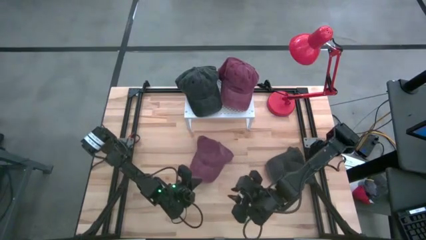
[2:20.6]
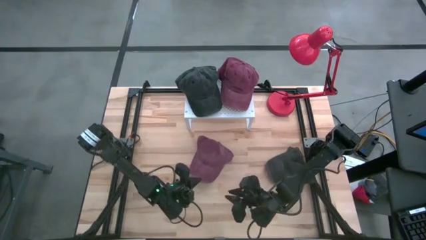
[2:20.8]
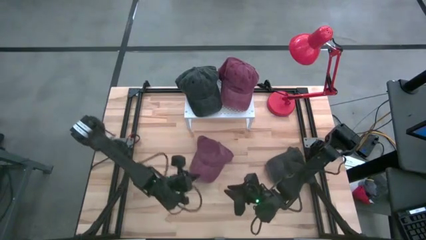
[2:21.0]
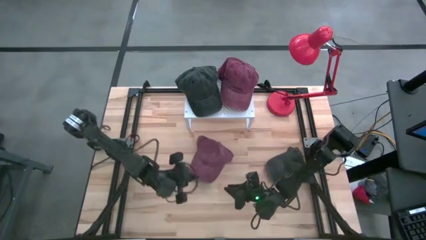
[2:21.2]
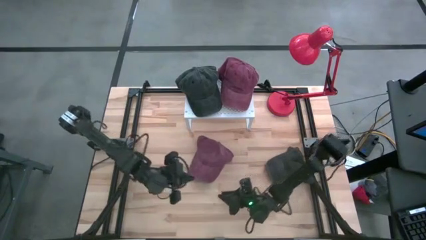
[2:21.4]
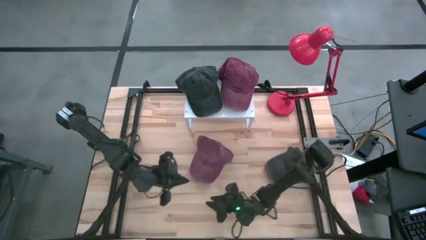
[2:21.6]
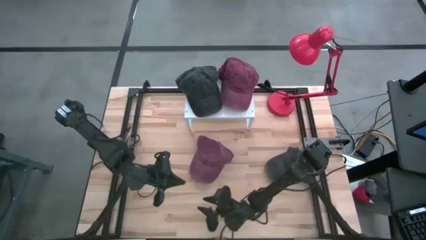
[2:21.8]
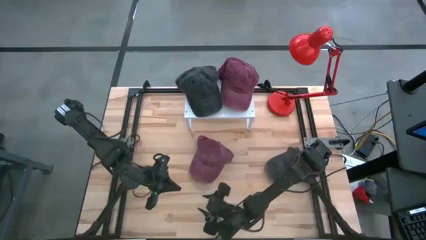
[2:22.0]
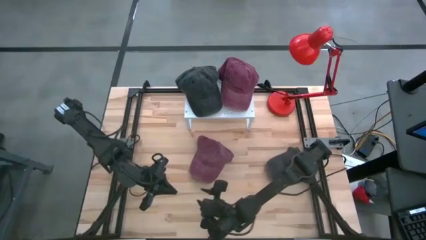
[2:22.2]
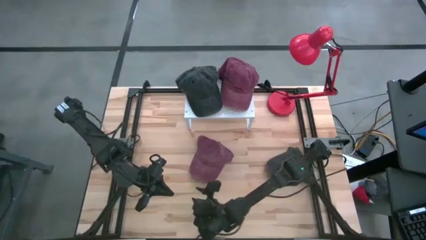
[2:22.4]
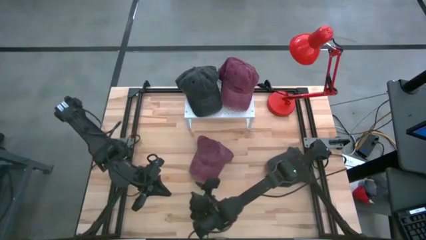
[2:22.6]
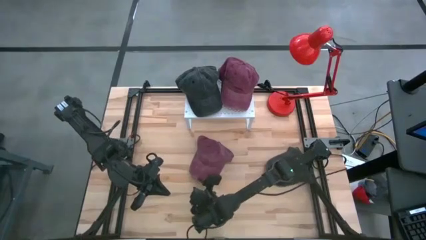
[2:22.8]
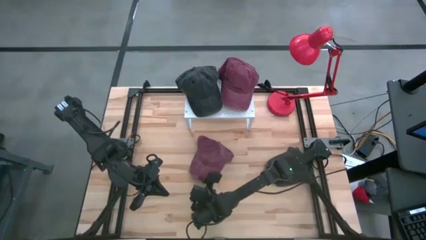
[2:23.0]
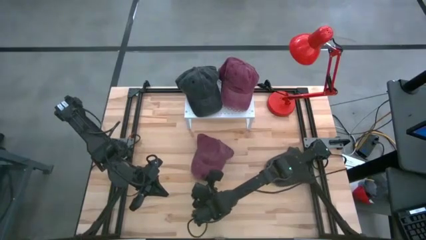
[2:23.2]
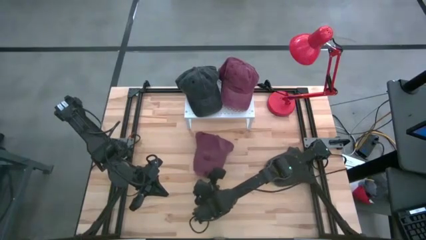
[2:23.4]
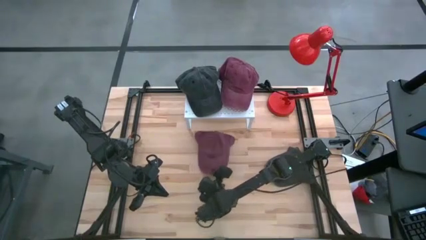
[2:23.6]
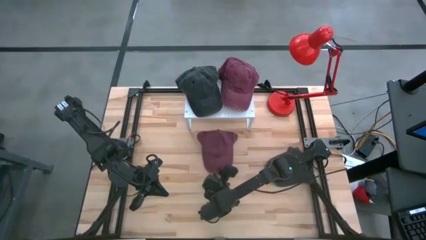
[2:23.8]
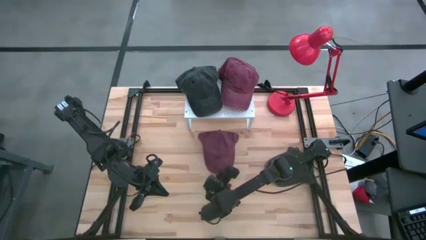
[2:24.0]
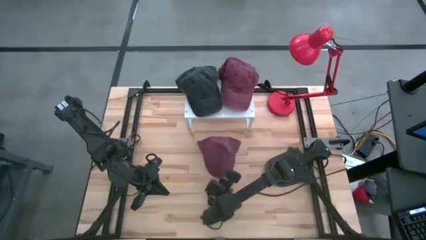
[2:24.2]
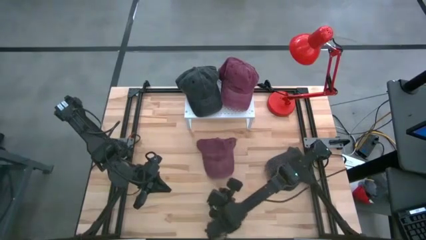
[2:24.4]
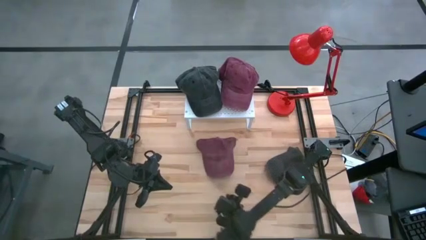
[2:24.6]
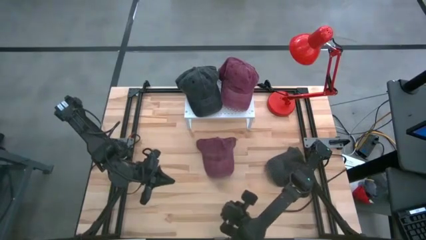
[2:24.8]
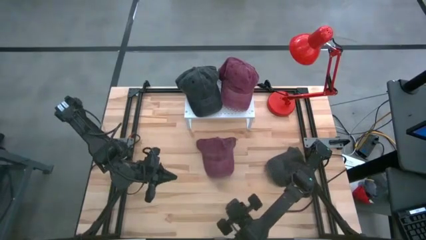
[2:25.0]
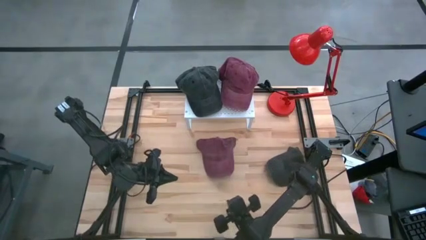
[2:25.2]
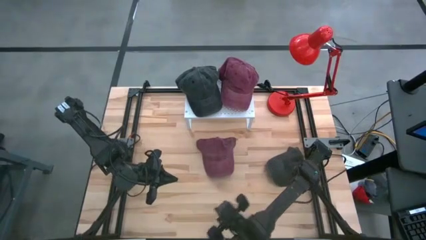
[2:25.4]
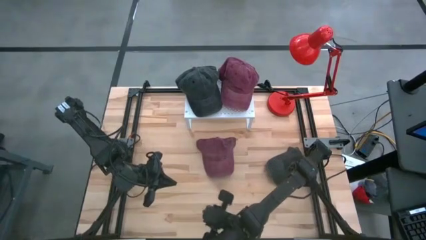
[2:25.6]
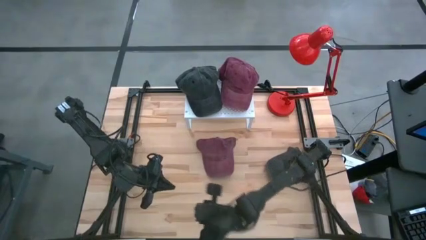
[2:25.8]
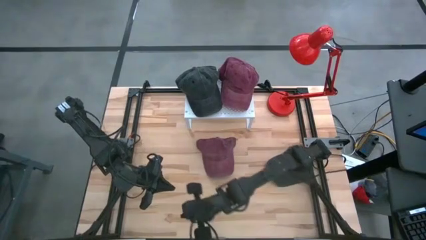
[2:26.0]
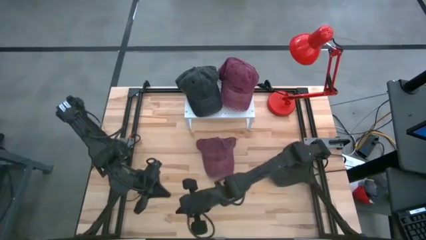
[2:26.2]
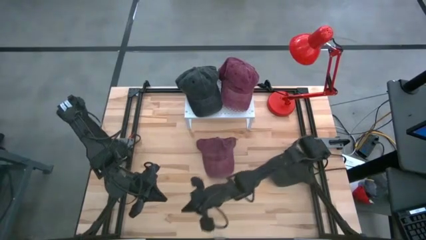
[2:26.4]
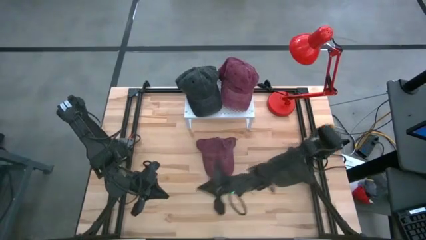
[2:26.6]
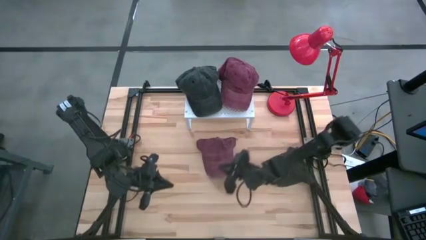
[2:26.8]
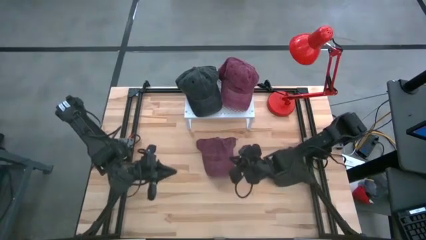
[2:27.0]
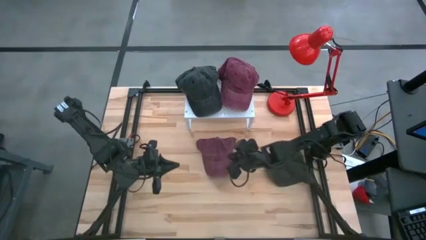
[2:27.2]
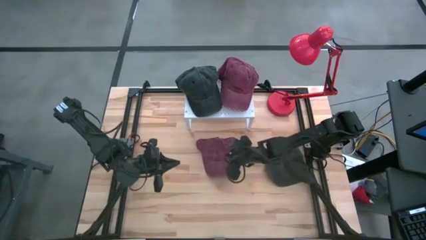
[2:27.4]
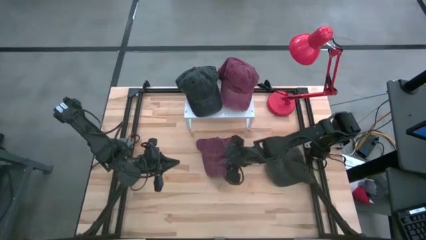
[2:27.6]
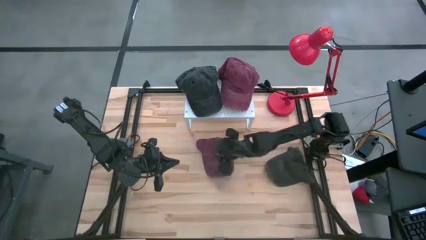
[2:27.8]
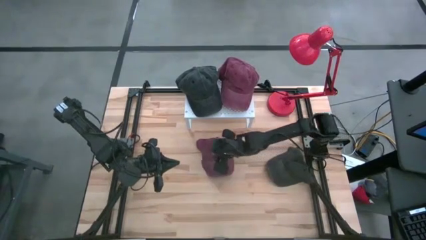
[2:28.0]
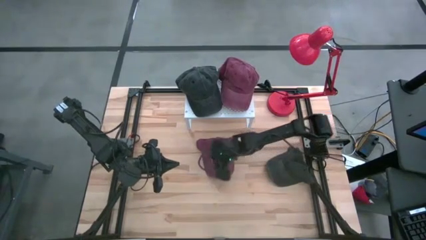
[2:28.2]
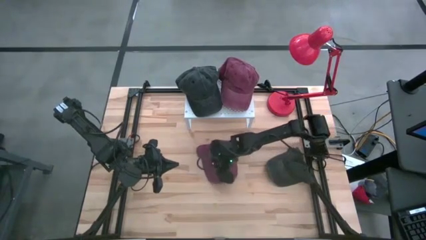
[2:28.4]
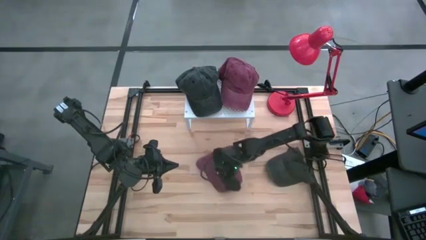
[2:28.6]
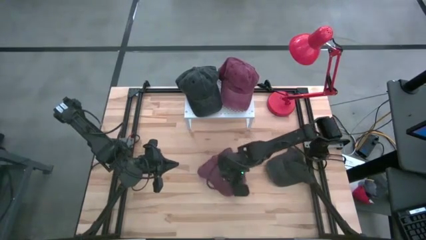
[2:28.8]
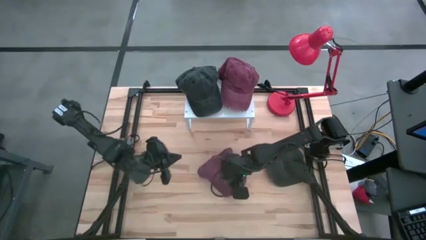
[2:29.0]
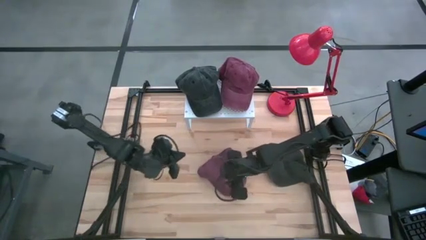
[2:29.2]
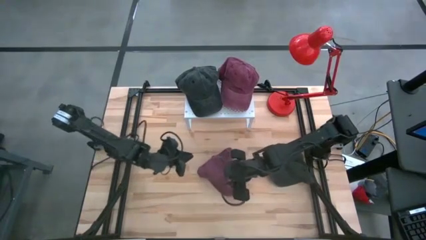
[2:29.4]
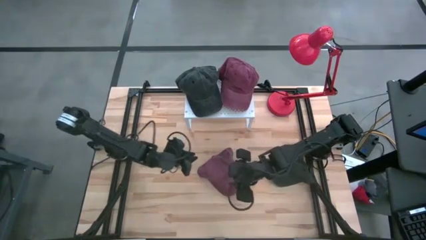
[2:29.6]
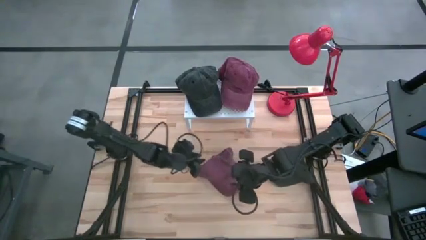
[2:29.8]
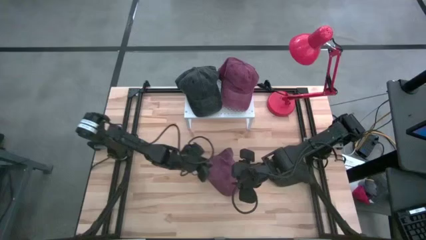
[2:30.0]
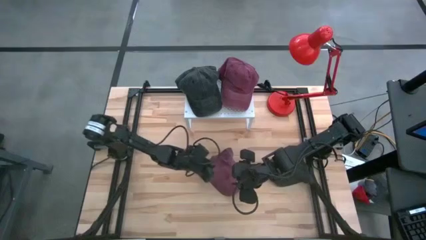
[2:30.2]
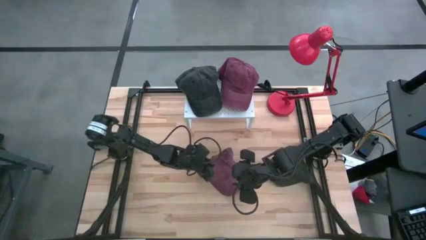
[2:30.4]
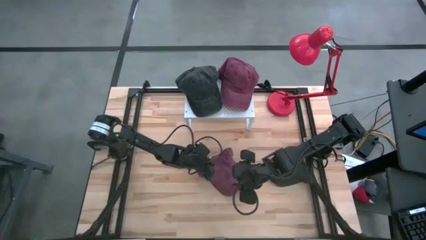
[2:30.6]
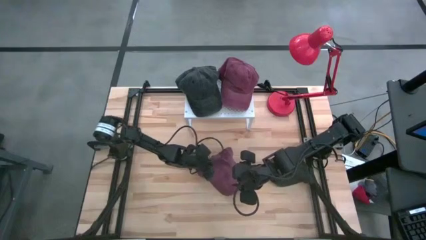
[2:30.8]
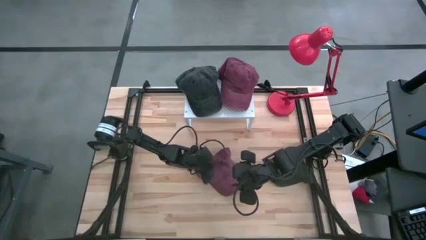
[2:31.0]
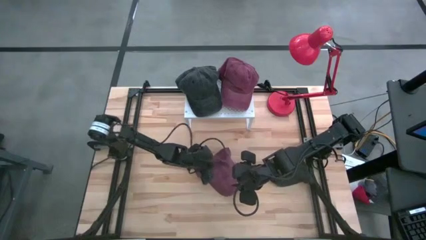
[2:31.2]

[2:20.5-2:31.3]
Task: Pick & Place hat
Stack the red cap on top of the red cap on the shelf

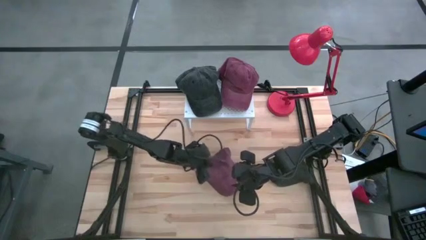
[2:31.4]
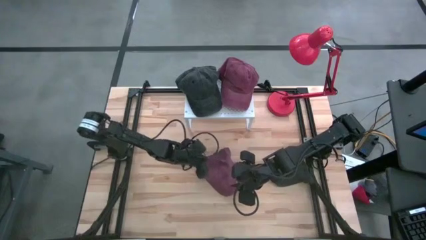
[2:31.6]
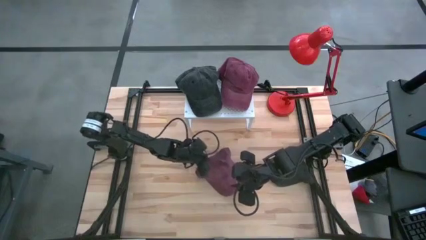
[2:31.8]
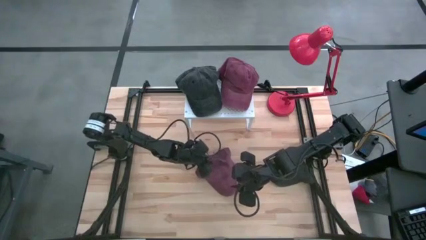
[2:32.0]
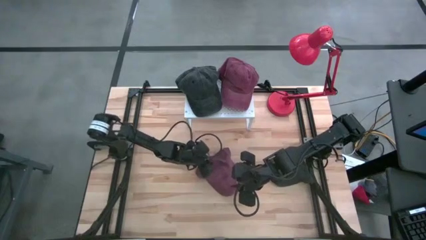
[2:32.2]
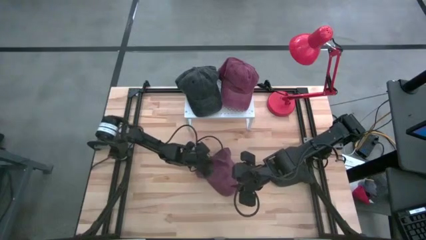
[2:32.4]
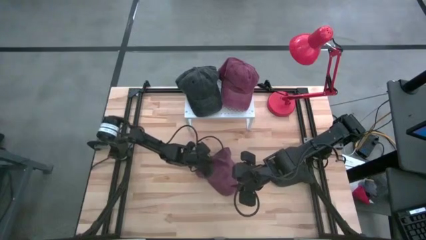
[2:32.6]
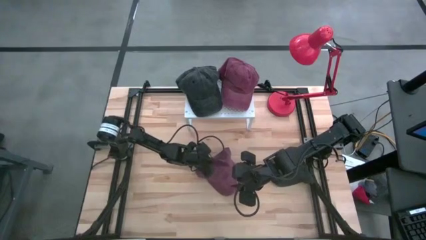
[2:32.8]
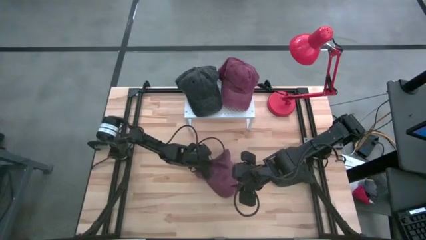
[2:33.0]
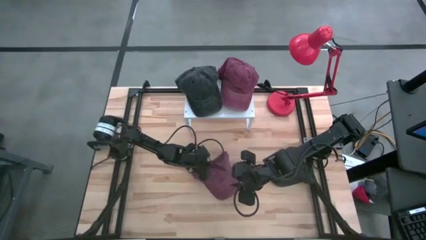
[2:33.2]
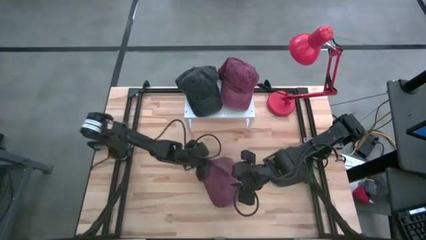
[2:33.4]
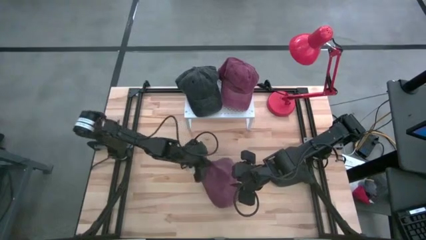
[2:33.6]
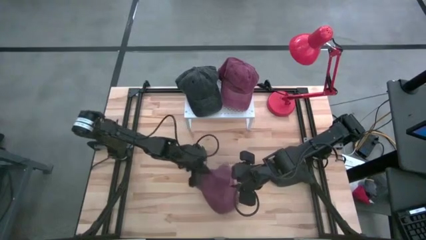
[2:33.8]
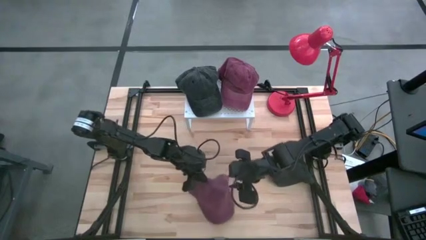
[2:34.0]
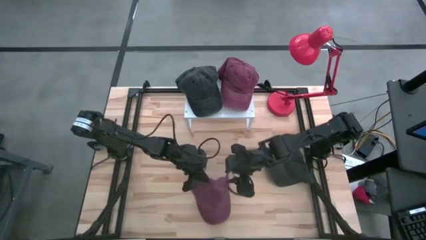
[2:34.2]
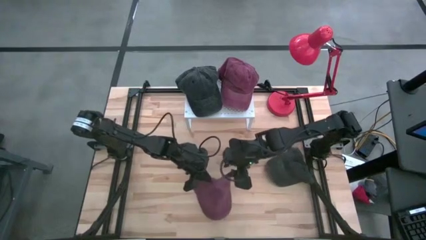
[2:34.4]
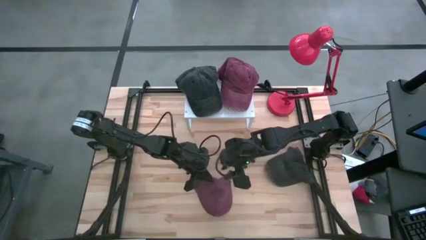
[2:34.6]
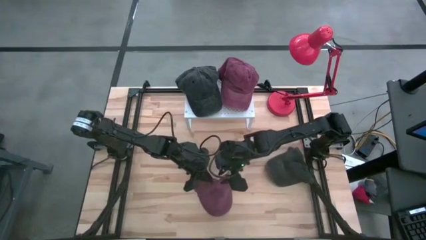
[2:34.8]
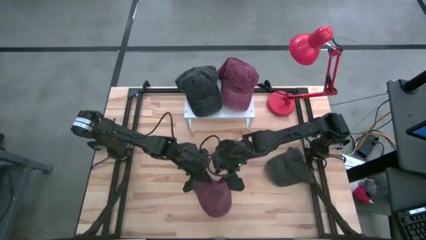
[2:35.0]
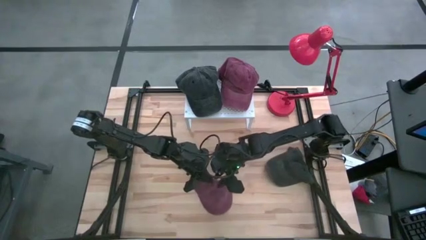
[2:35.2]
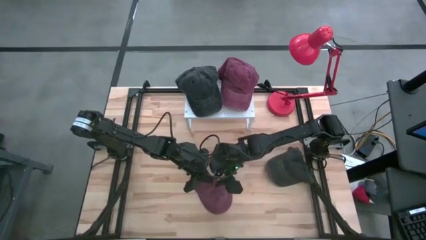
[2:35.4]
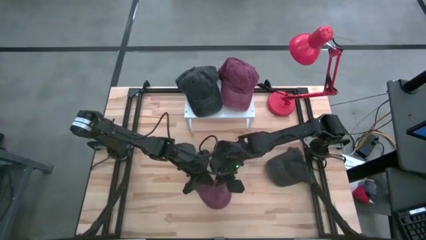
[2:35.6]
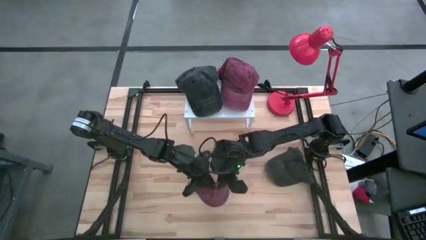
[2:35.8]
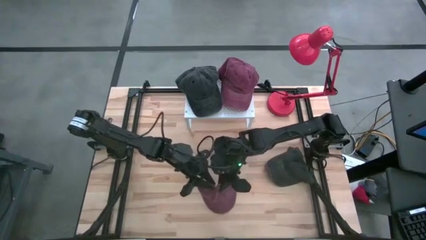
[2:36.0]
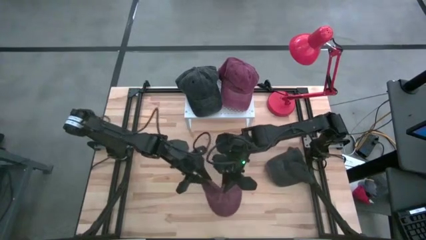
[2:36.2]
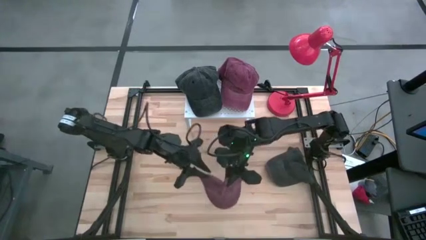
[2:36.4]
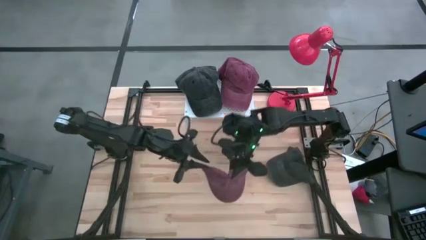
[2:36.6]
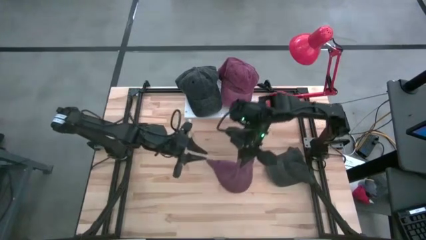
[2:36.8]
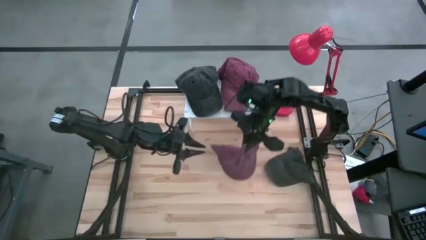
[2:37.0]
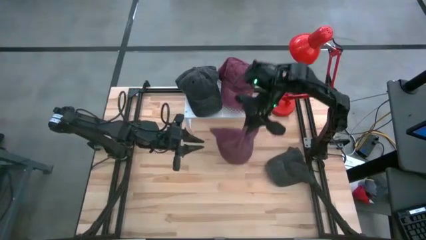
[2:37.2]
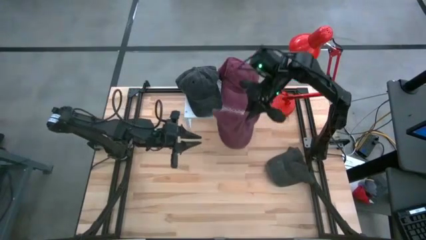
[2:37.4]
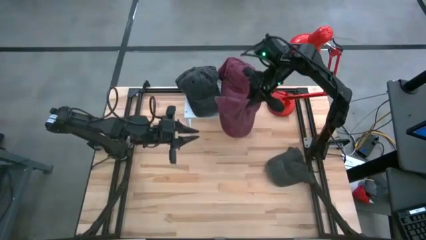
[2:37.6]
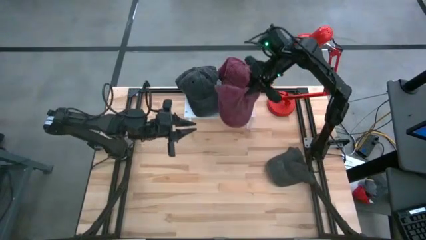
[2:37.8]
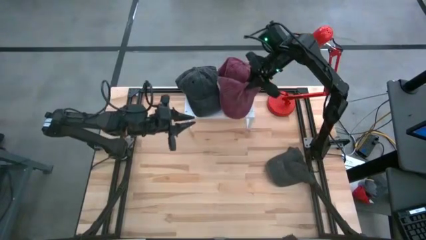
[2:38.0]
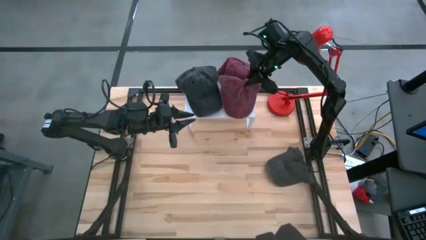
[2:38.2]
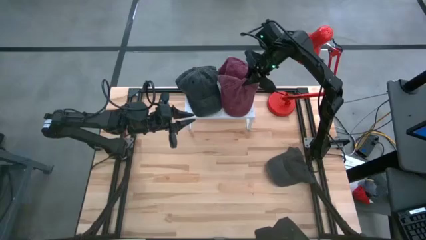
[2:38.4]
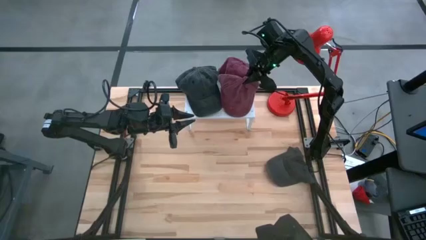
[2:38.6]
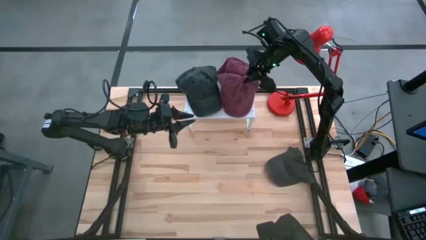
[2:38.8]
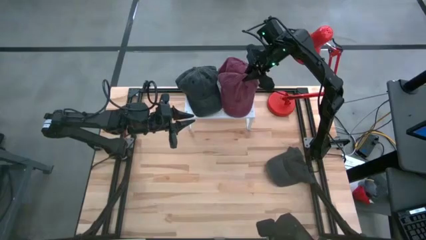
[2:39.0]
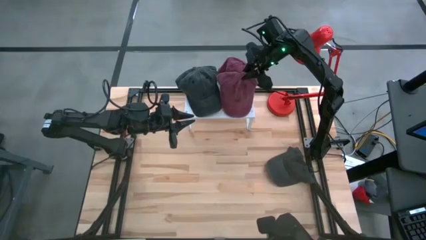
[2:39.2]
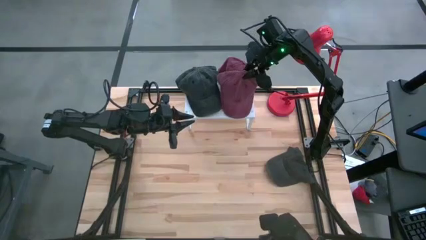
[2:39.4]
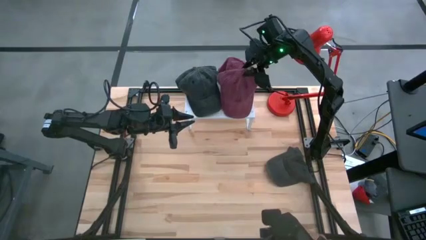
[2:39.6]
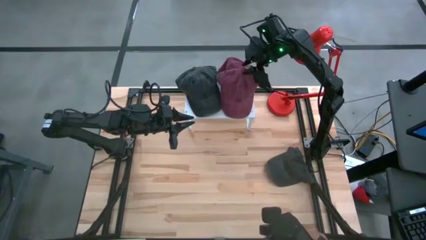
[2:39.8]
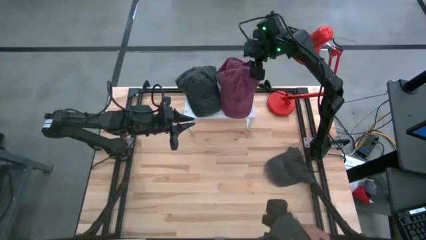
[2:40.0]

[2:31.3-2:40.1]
Stack the red cap on top of the red cap on the shelf
